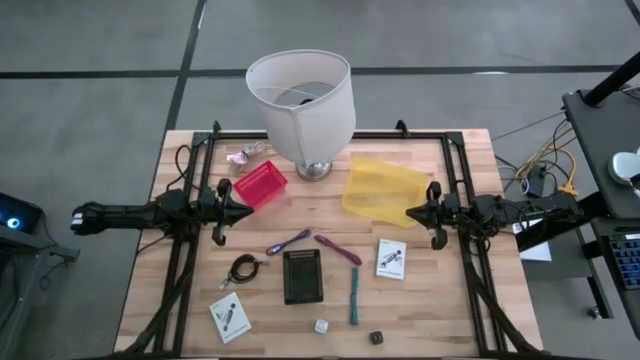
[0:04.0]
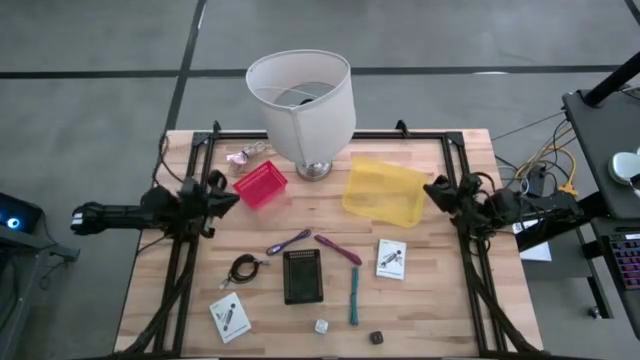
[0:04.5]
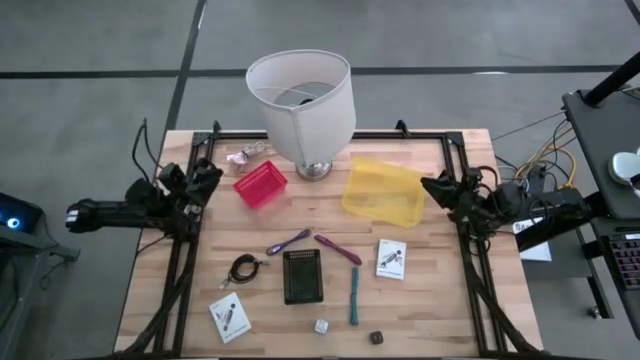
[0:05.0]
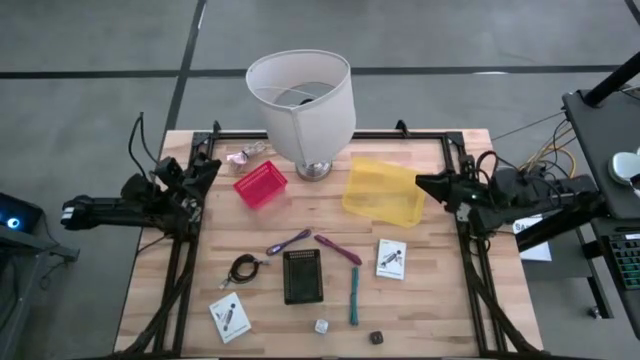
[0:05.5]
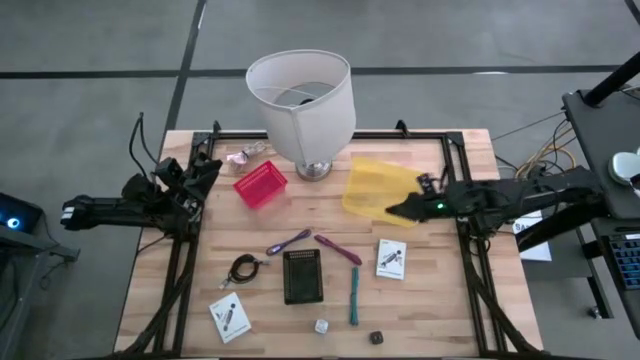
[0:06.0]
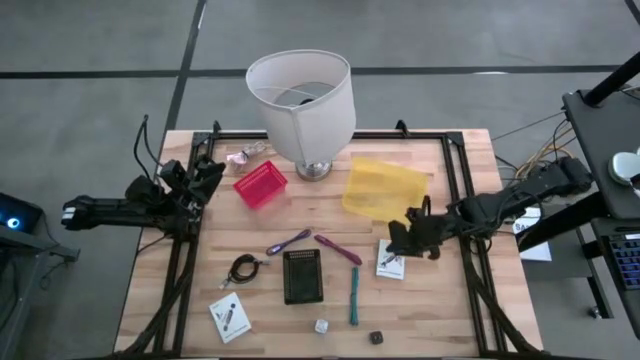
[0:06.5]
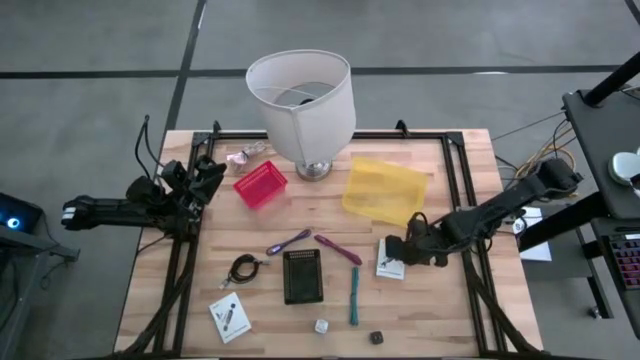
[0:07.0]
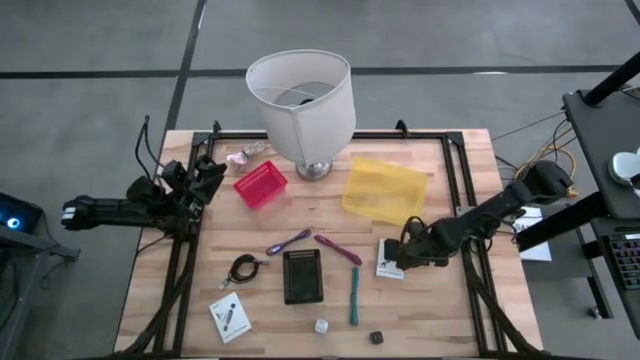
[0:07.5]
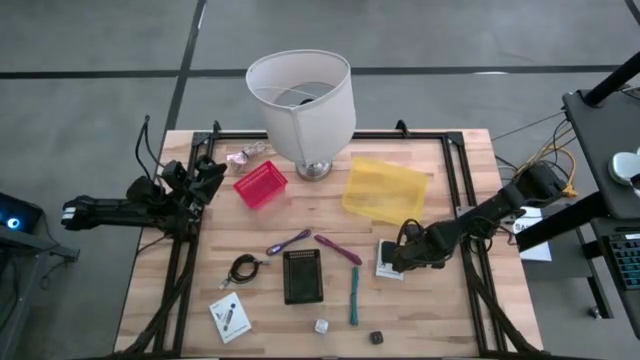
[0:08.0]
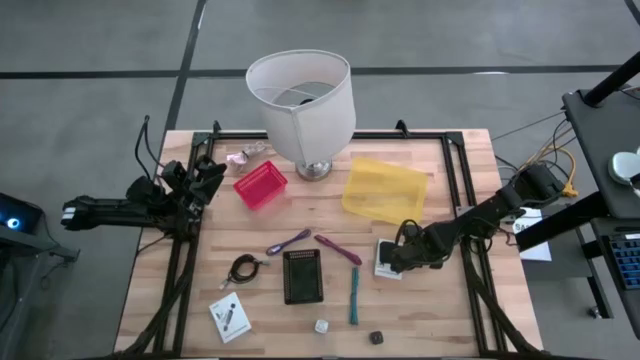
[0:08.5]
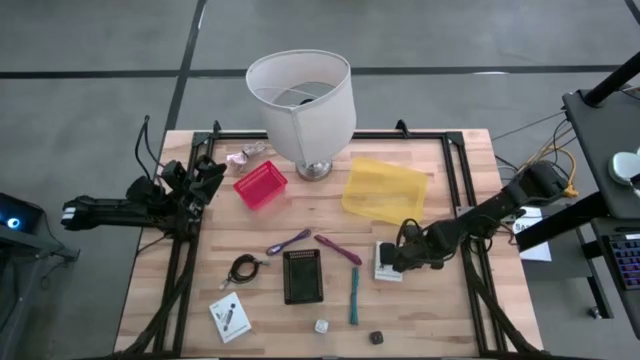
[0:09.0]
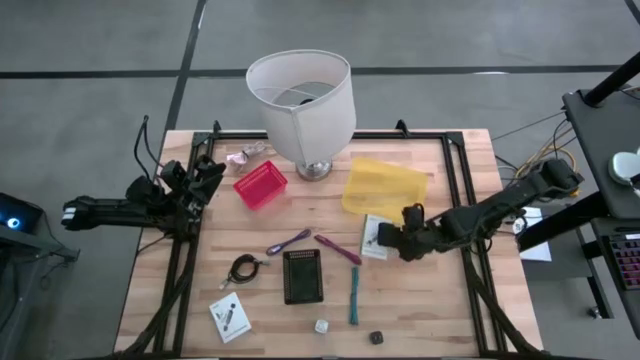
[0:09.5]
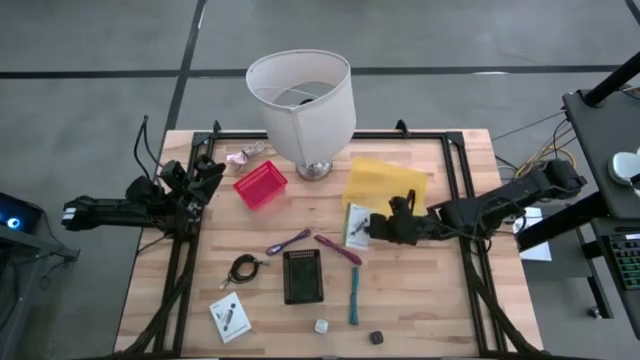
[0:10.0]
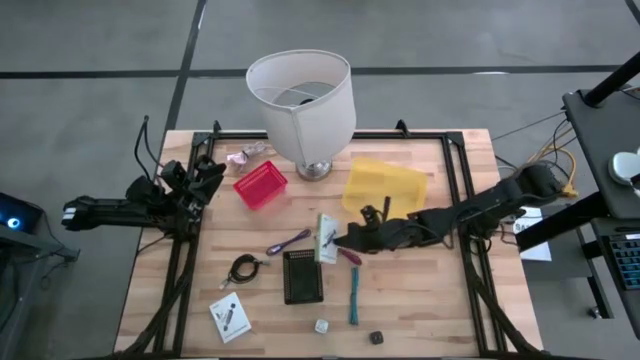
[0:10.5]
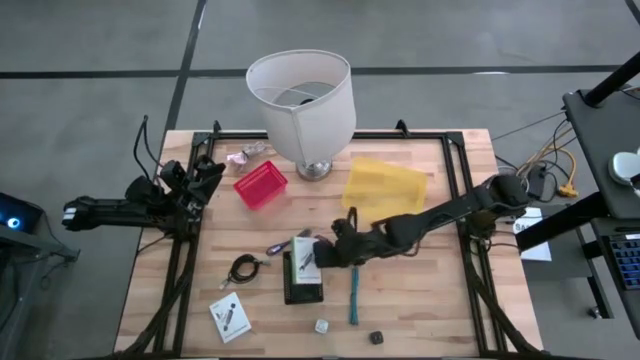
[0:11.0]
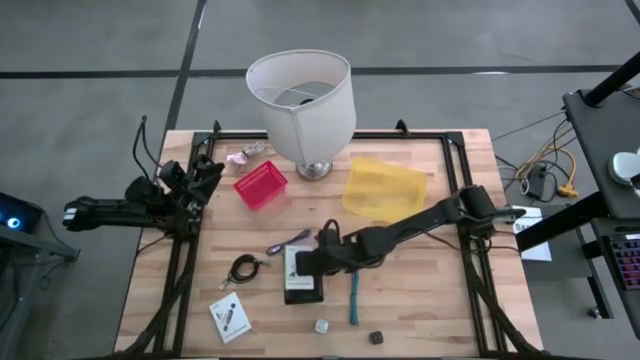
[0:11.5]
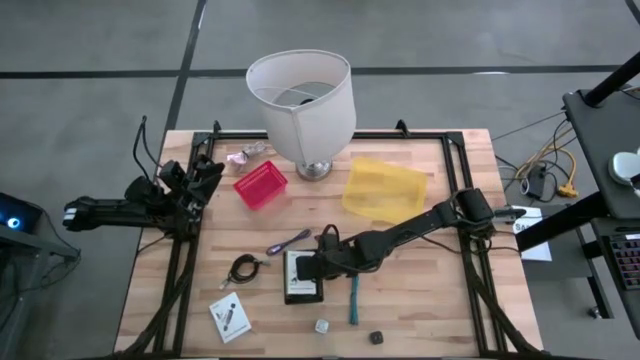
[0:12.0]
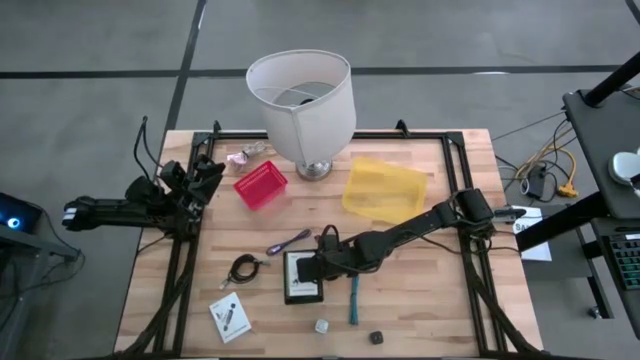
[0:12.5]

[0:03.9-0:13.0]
Task: Pick and place items into bin
Put the right card reader box into the black bin

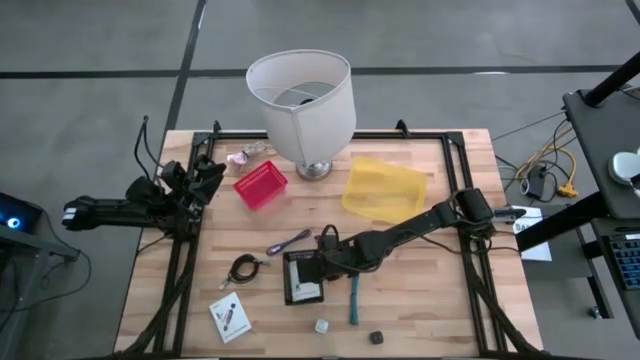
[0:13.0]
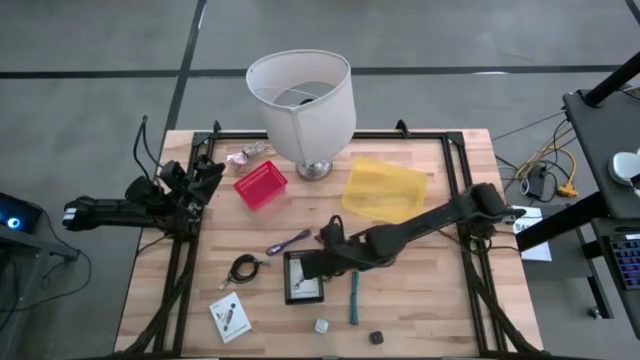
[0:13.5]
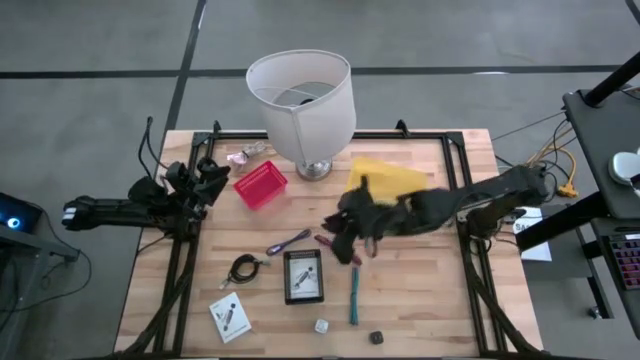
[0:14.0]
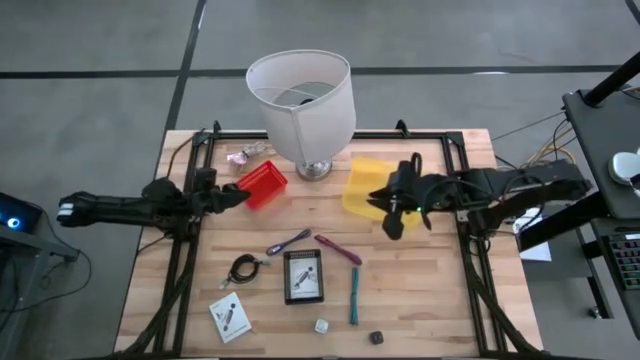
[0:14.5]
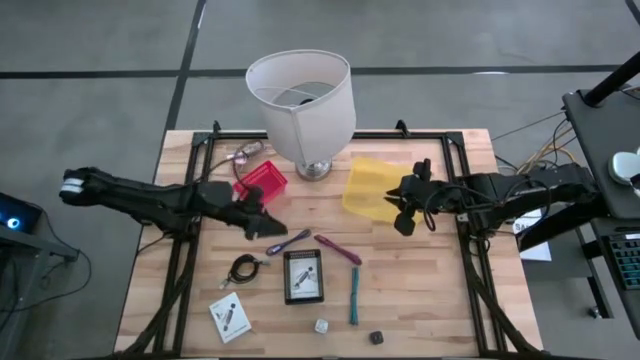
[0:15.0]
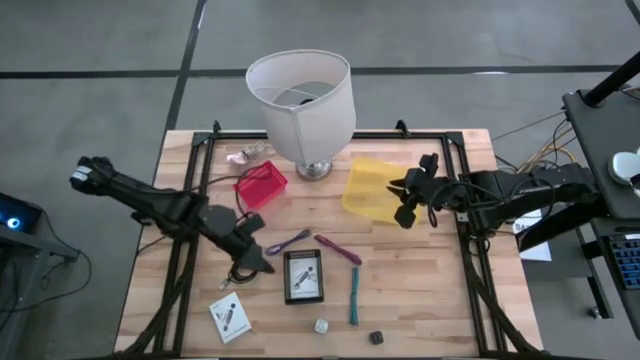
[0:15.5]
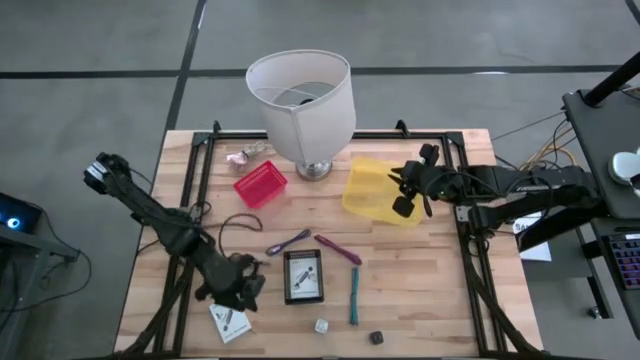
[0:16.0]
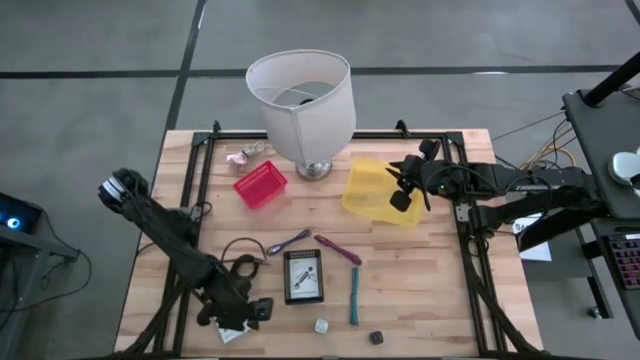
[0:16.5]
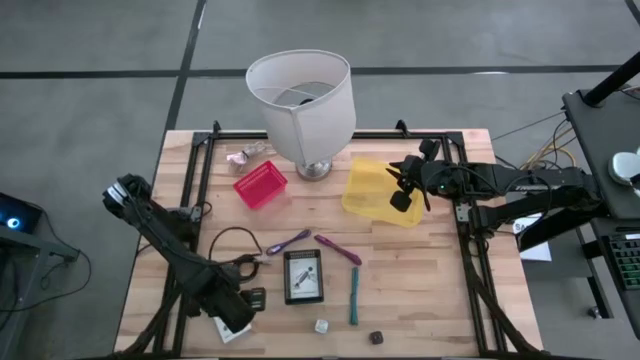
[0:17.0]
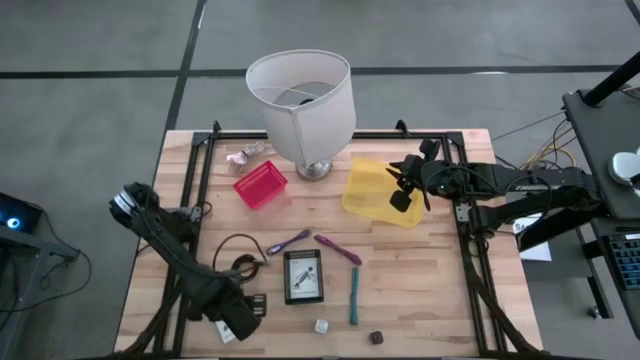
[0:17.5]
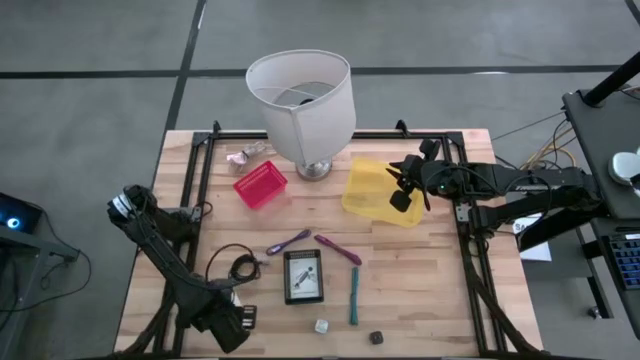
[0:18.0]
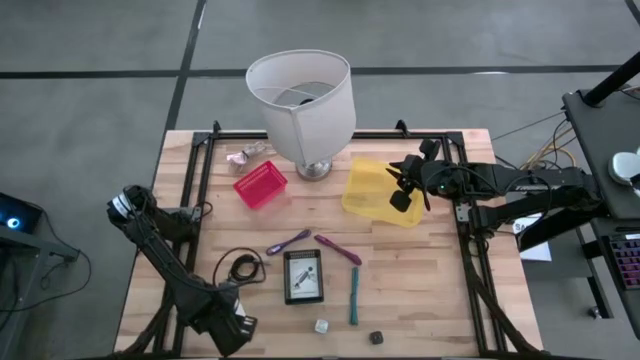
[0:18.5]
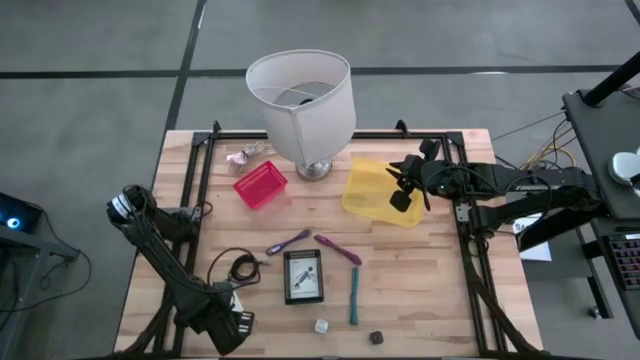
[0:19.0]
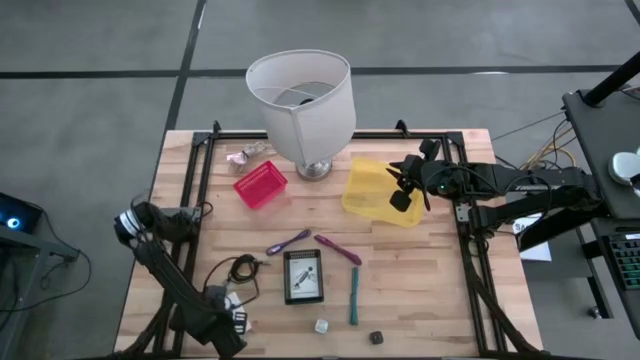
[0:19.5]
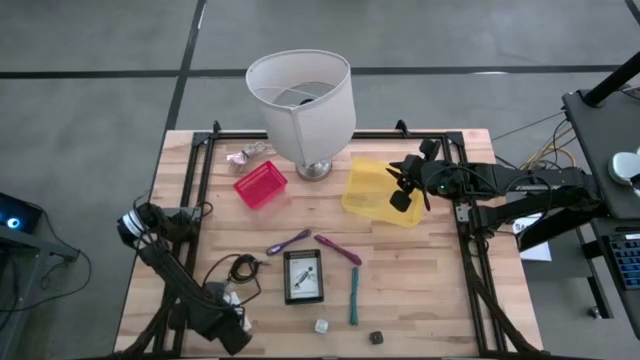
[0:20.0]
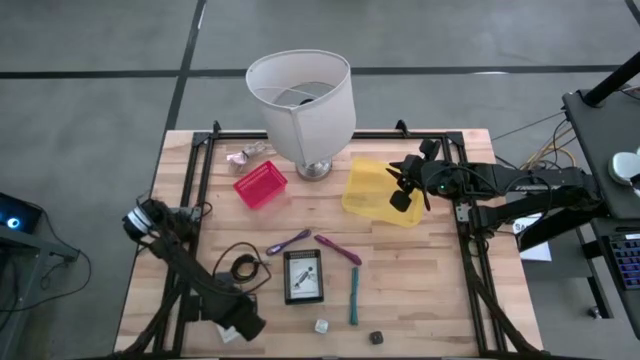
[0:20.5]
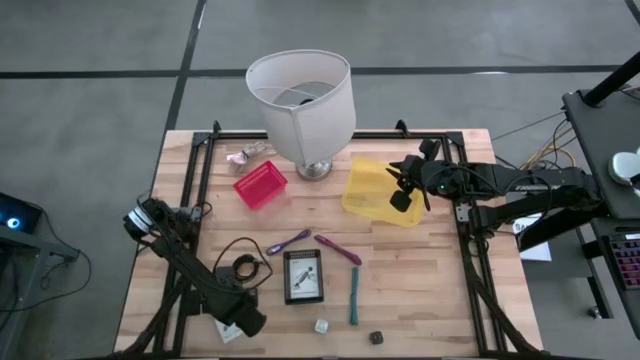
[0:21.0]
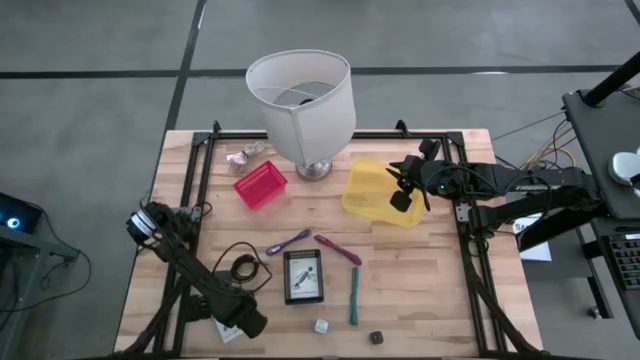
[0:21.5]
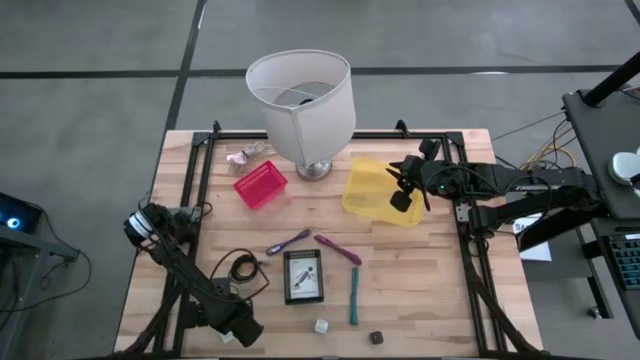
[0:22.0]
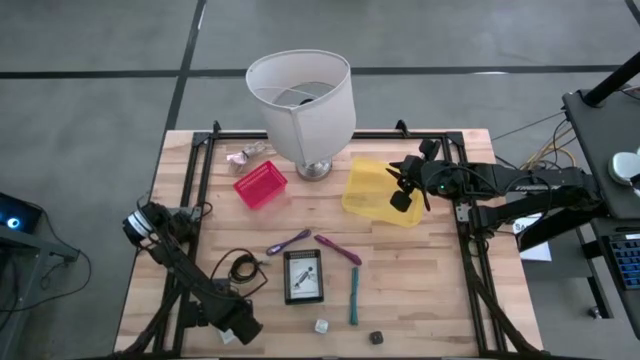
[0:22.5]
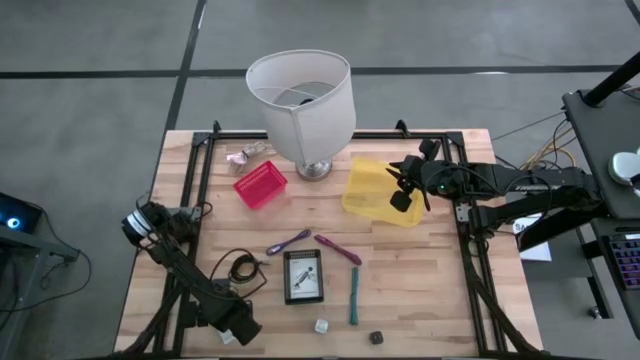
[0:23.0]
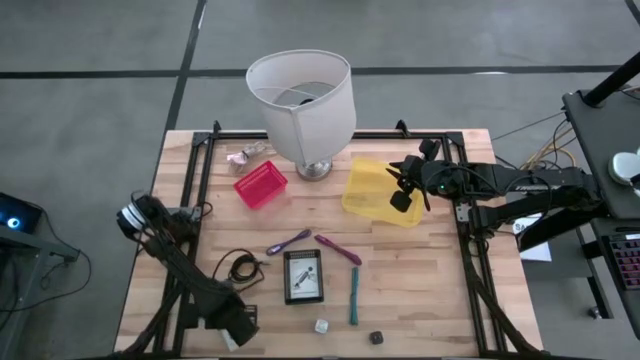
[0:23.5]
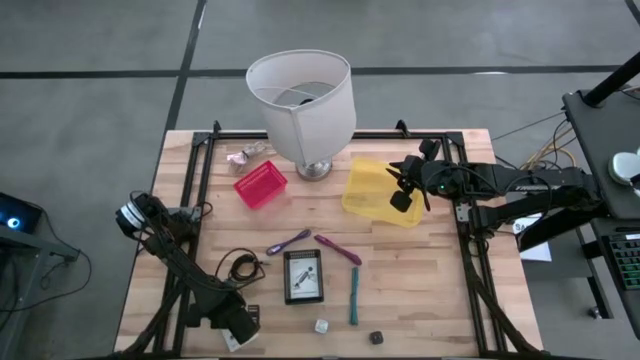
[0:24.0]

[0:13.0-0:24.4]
Put the card reader box into the black bin
